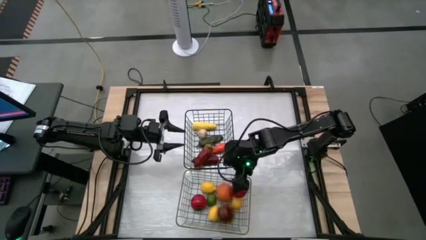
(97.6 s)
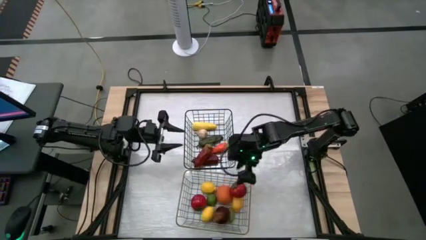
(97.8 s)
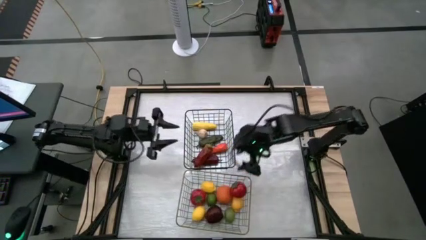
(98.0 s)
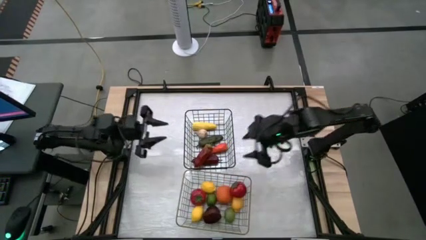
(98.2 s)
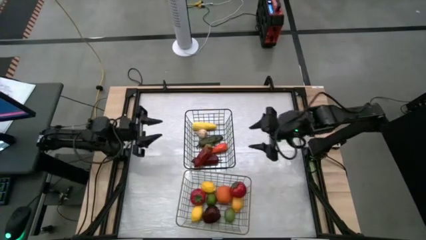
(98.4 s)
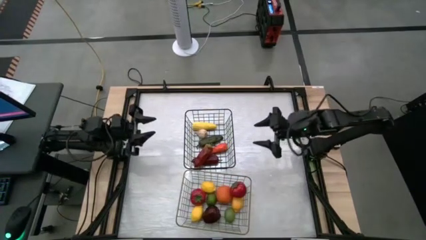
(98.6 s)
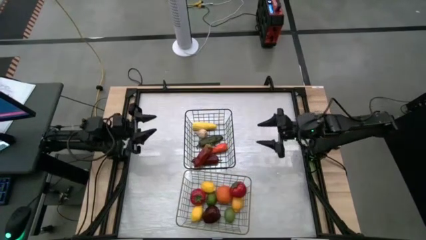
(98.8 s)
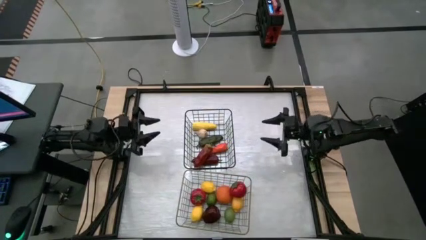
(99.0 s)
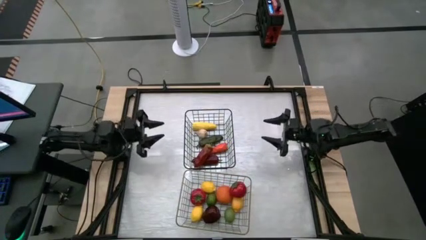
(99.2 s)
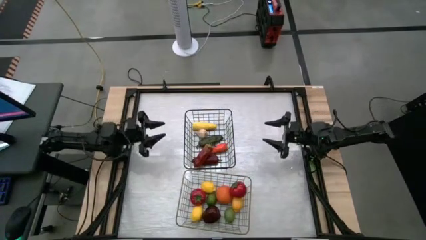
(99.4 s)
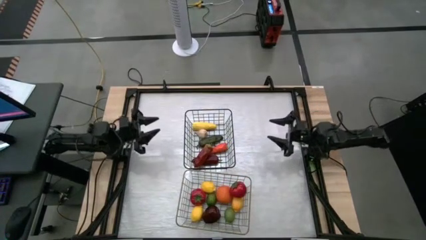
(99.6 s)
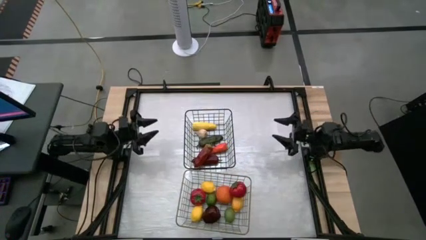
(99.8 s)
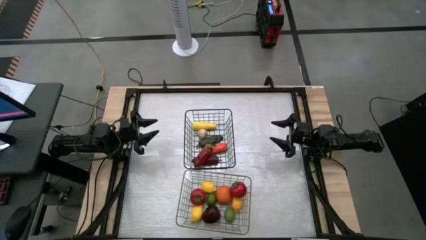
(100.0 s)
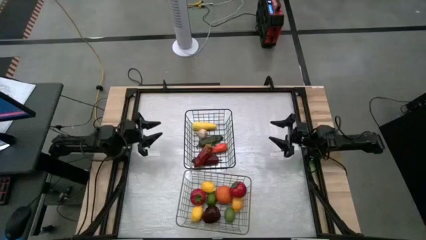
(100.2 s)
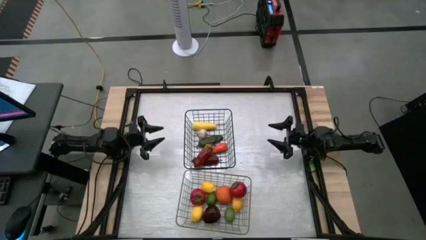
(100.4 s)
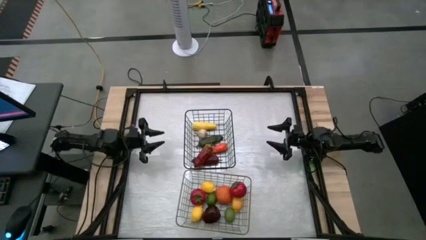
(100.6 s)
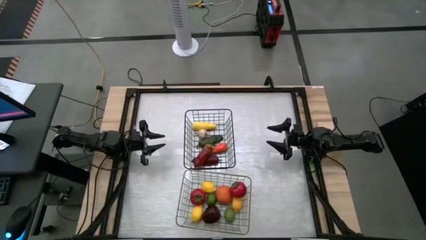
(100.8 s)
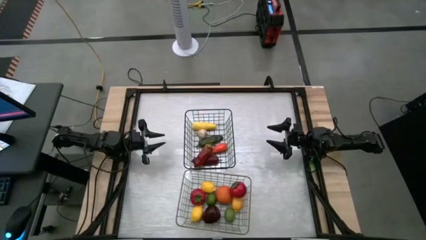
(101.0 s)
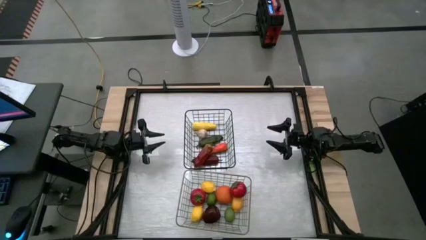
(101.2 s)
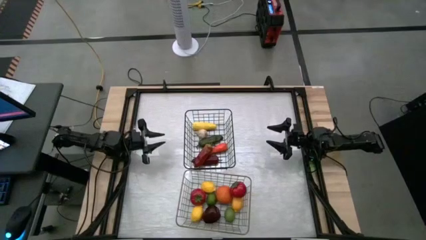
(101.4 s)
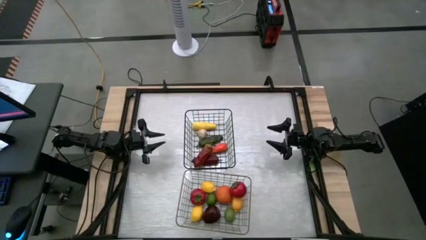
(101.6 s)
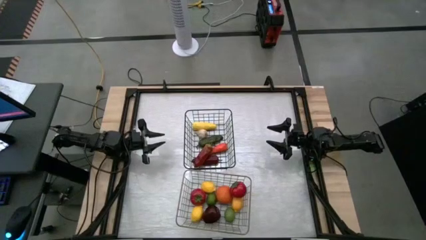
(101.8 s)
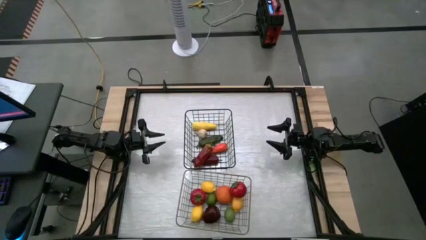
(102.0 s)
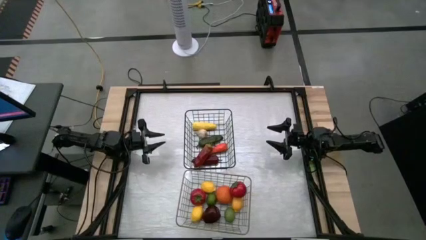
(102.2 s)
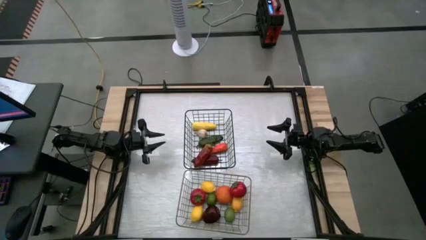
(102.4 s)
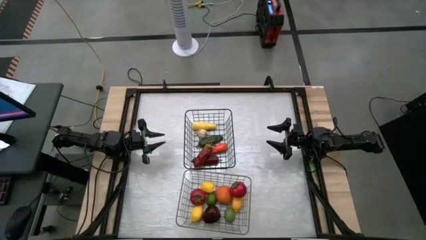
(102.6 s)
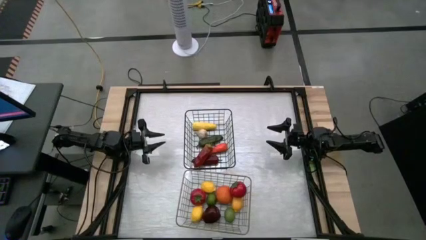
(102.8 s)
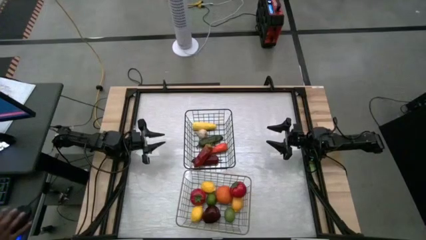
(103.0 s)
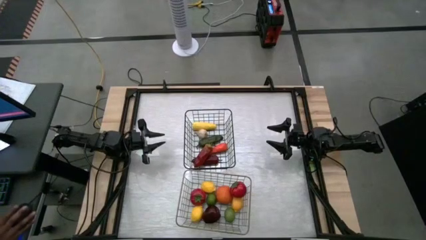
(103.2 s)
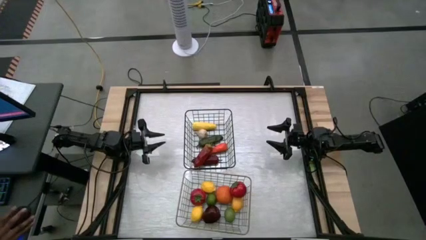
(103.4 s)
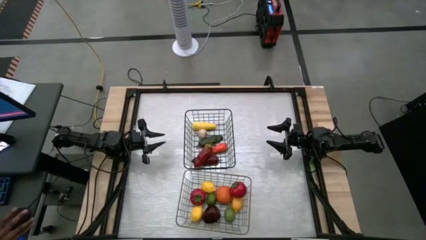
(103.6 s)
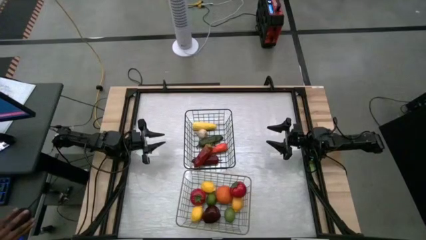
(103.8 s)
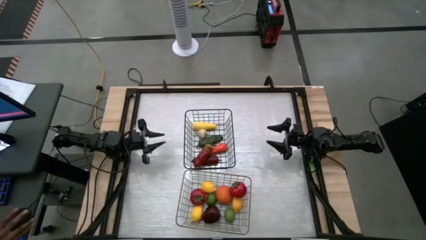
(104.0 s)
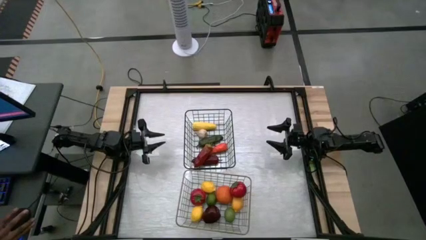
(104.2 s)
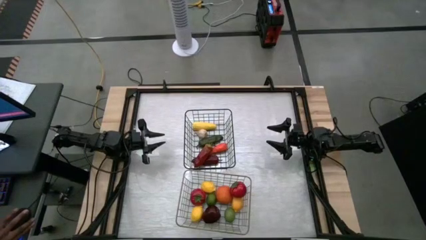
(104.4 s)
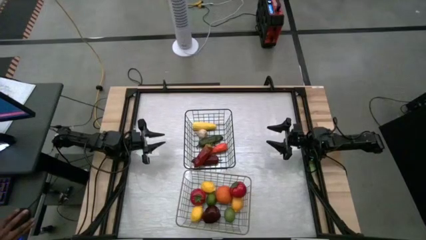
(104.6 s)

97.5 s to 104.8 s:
Task: Sort produce into baskets
Return to Home Position

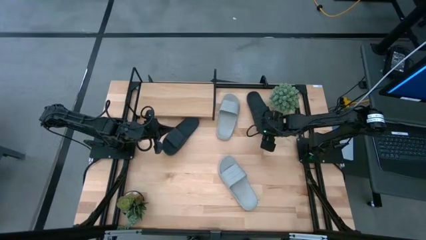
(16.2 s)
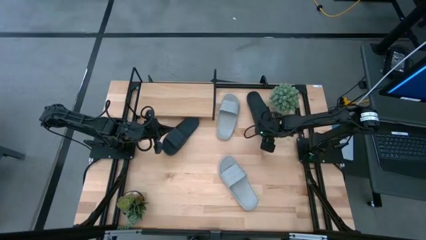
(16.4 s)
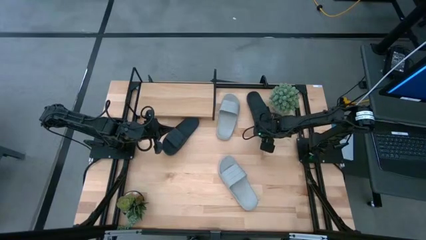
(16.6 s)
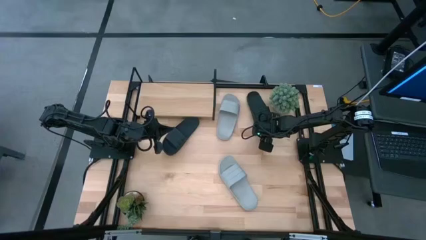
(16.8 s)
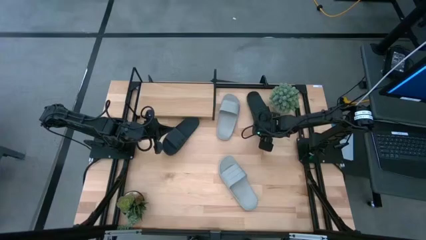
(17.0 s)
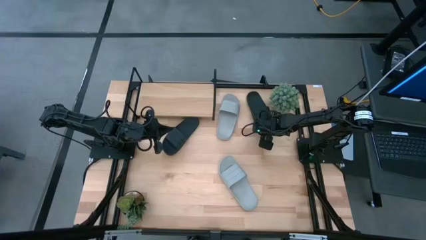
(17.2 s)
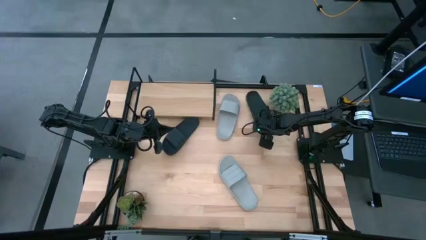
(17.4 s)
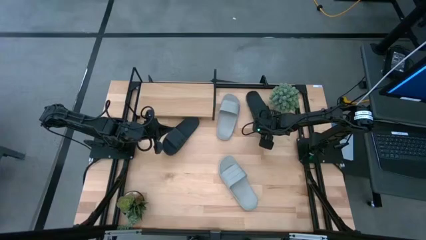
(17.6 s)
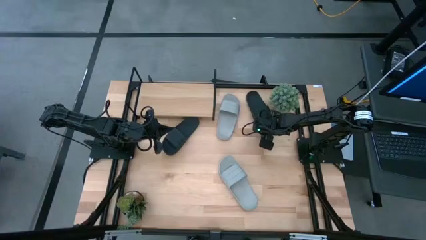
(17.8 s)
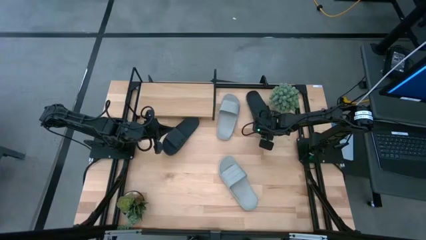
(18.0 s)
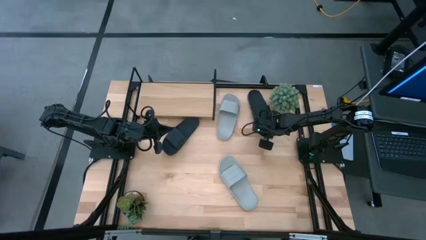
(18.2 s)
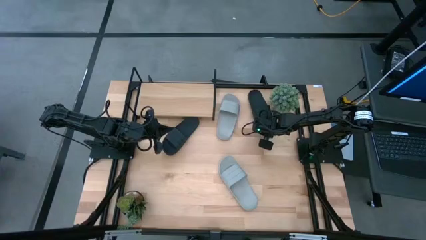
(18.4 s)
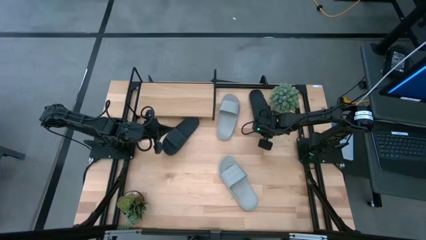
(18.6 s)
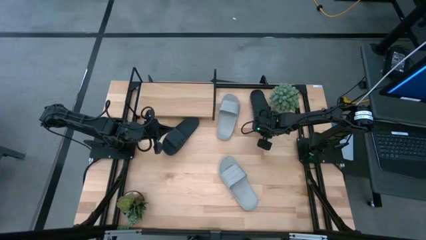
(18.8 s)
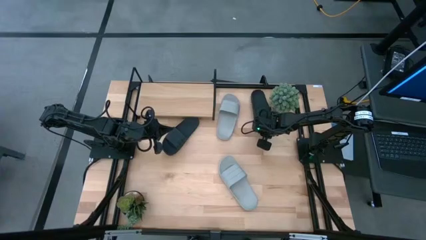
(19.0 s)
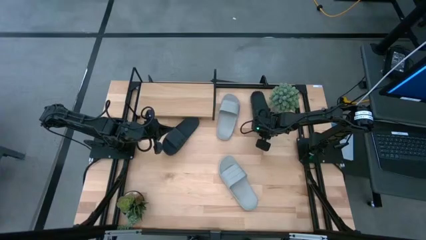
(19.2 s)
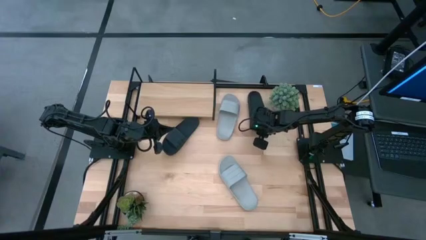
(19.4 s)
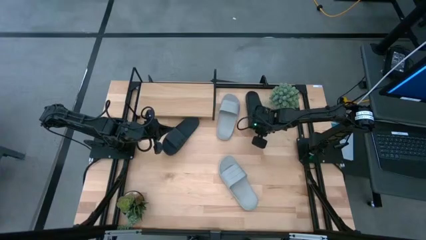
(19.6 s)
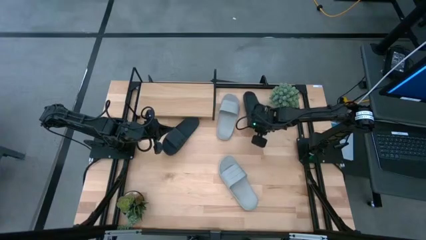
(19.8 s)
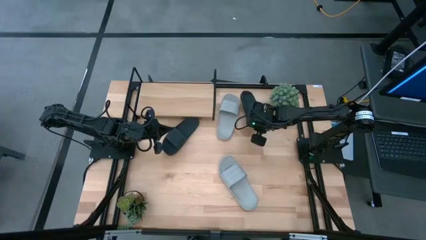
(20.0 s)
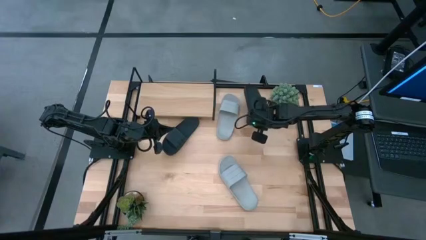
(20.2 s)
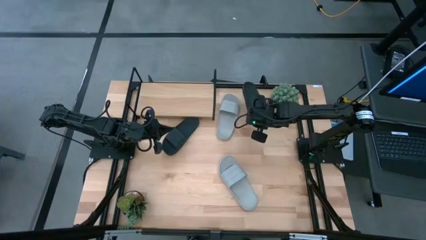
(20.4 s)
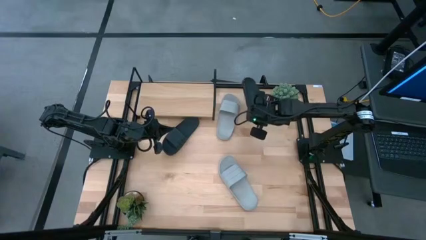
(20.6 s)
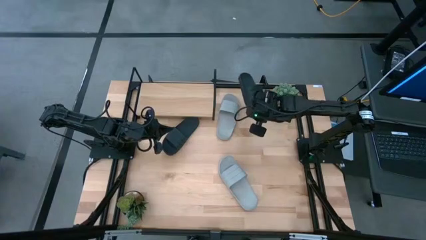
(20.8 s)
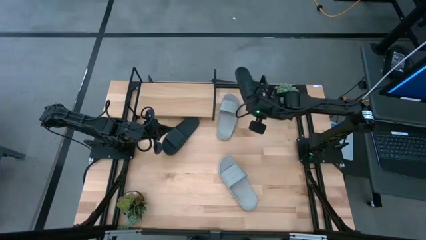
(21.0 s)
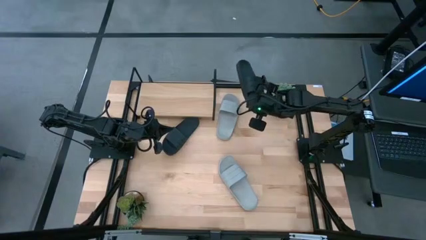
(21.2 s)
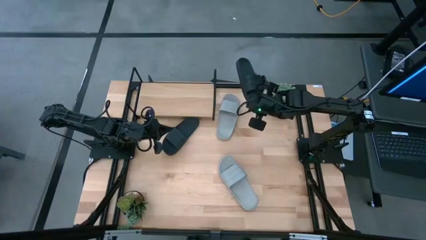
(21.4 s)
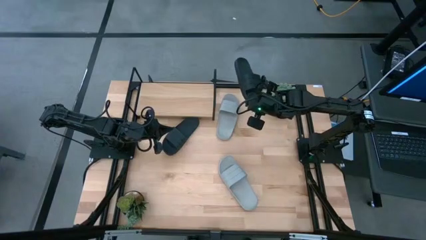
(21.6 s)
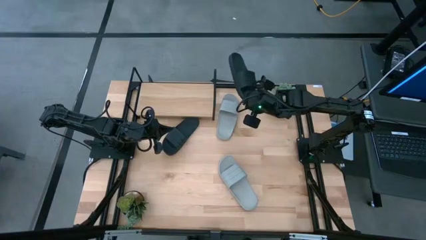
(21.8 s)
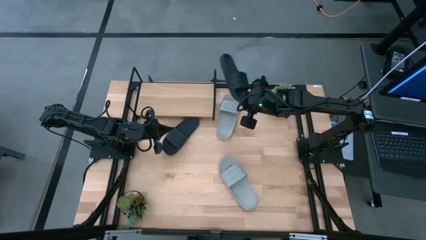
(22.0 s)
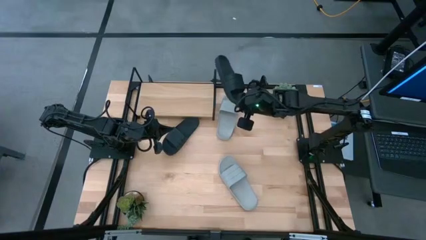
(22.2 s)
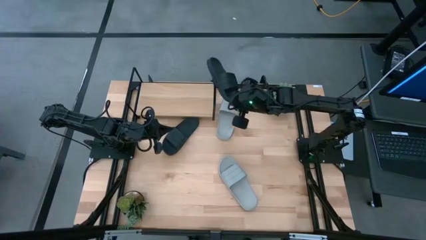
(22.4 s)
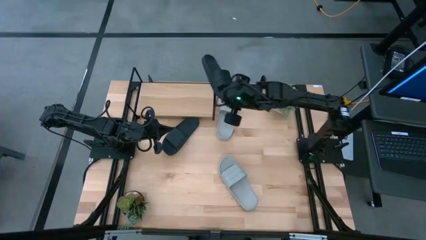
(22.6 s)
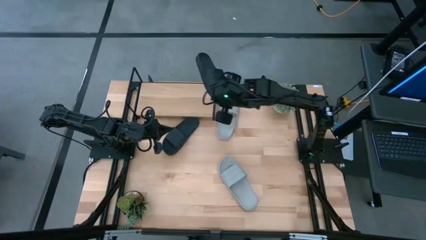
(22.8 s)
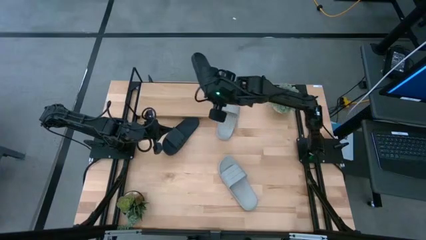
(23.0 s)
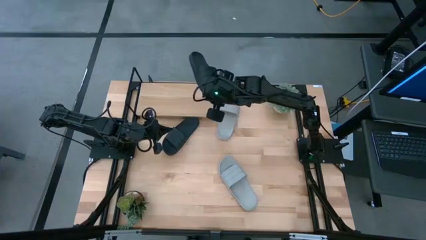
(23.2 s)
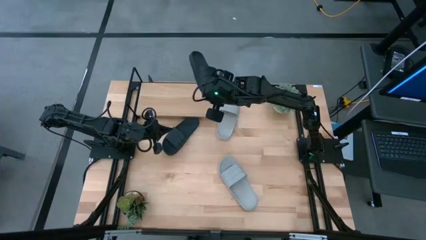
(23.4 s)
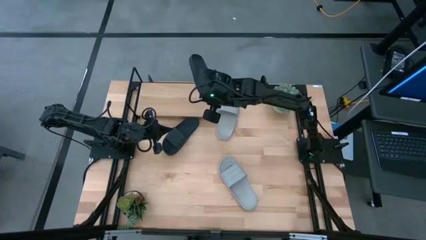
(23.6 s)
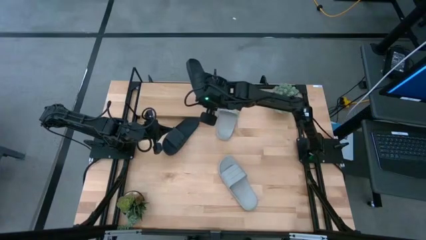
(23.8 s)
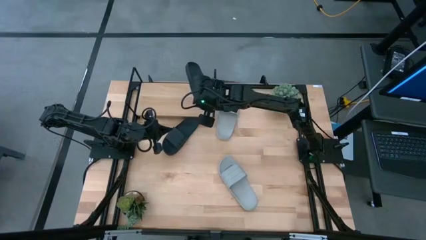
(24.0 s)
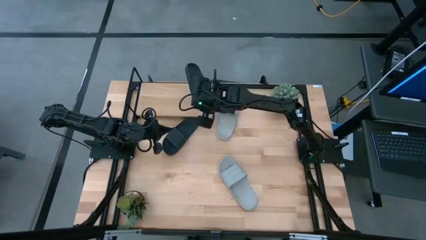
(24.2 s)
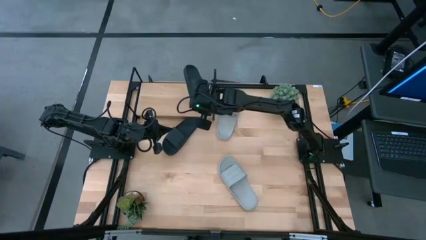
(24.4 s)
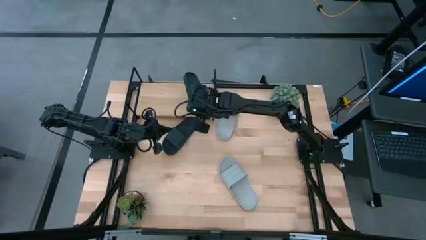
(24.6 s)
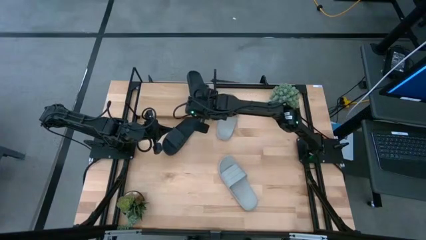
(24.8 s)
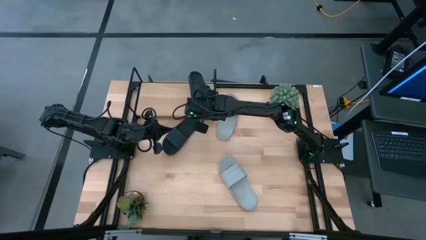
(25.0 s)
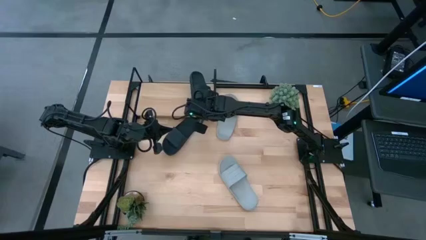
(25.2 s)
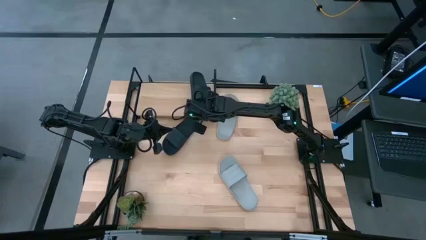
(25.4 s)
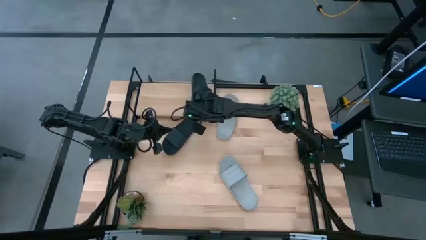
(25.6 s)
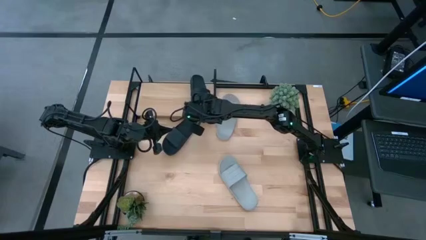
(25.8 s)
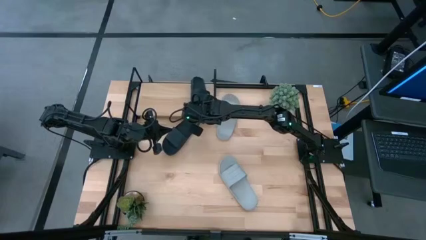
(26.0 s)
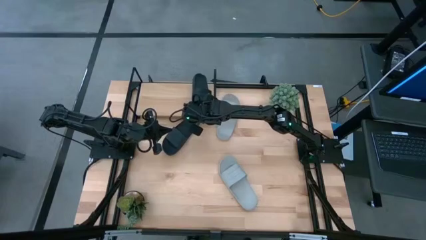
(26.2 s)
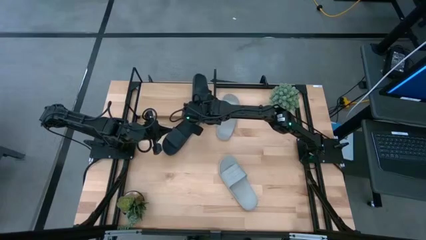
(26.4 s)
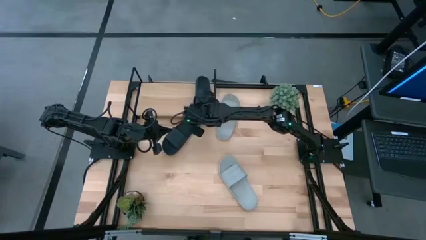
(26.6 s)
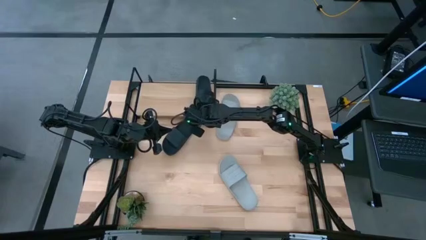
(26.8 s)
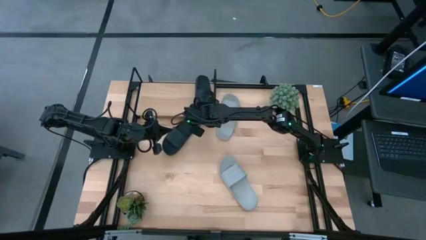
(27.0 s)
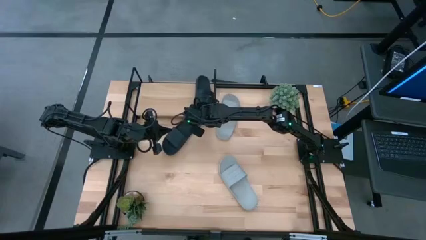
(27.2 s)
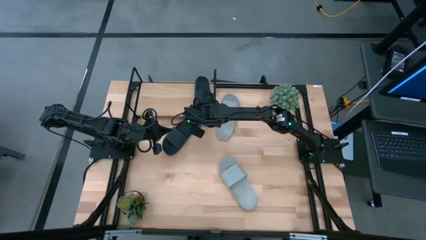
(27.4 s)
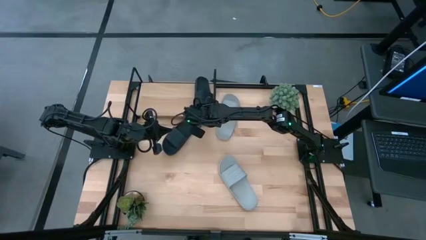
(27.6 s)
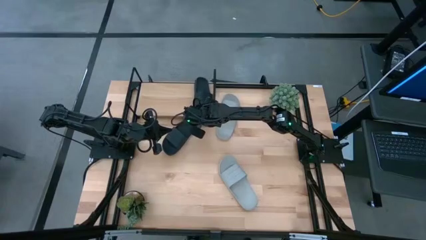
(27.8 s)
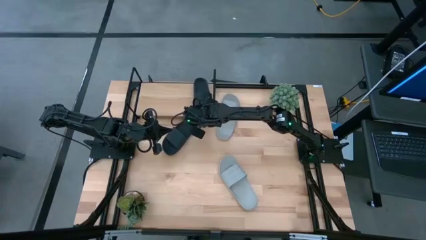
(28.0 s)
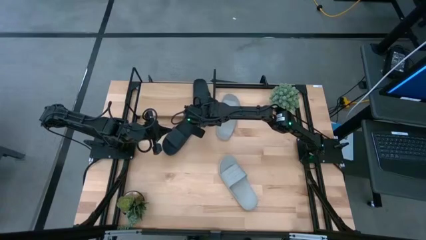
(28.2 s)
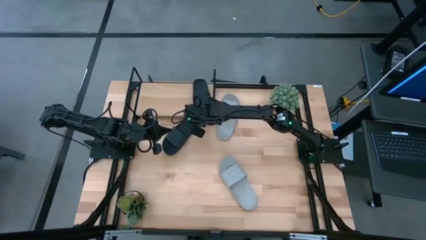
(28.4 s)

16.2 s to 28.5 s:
Task: Pick and place slides into the shelf
Put the right black slides on the shelf
